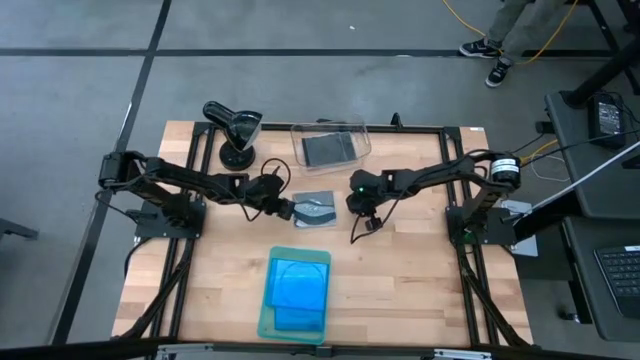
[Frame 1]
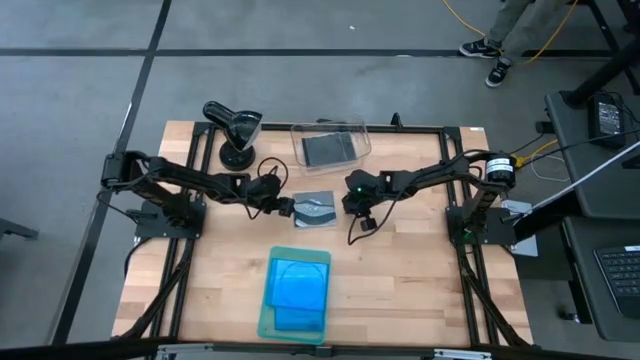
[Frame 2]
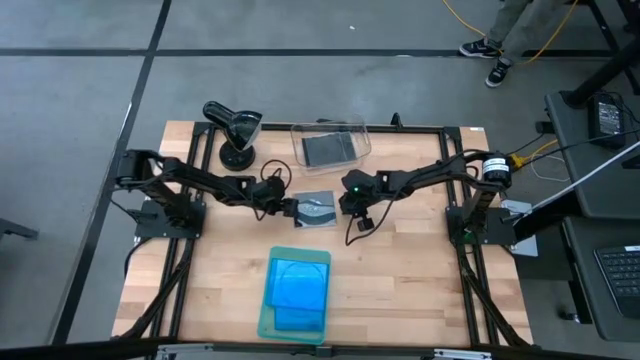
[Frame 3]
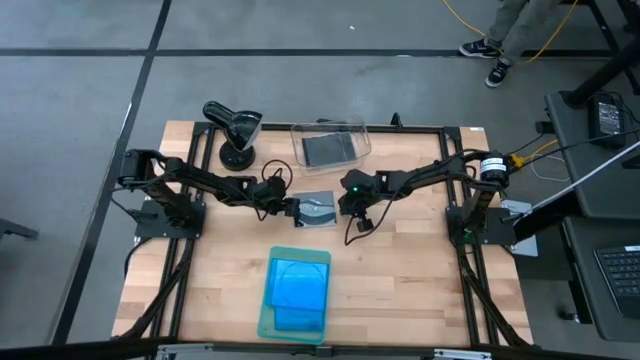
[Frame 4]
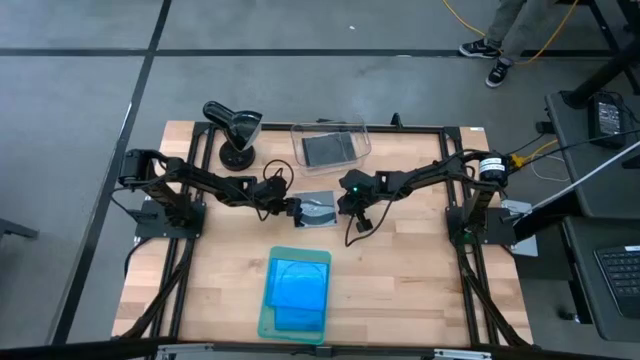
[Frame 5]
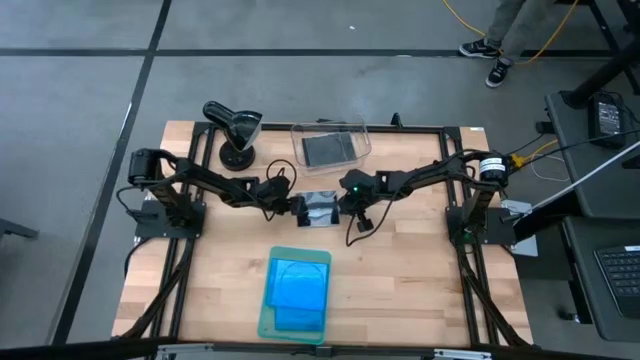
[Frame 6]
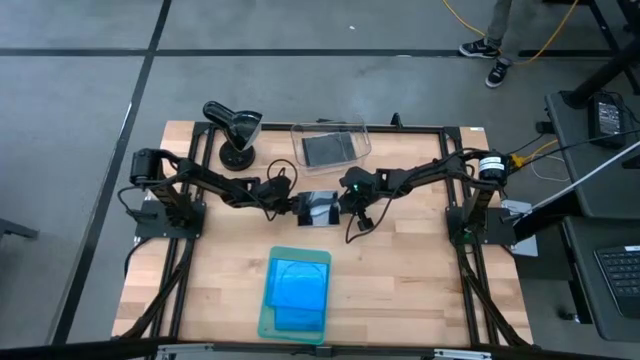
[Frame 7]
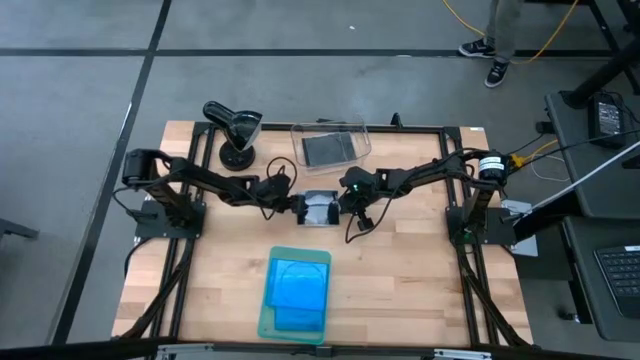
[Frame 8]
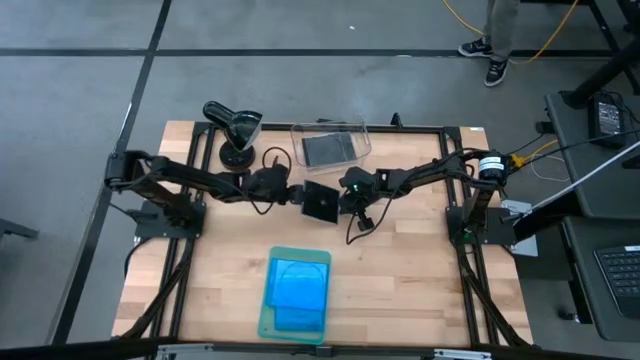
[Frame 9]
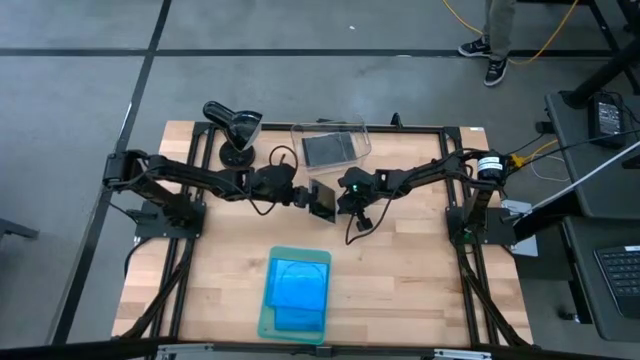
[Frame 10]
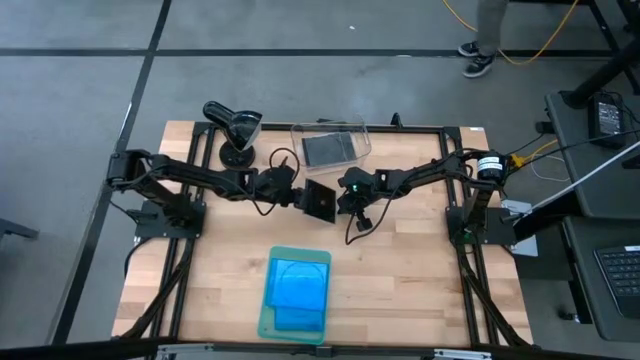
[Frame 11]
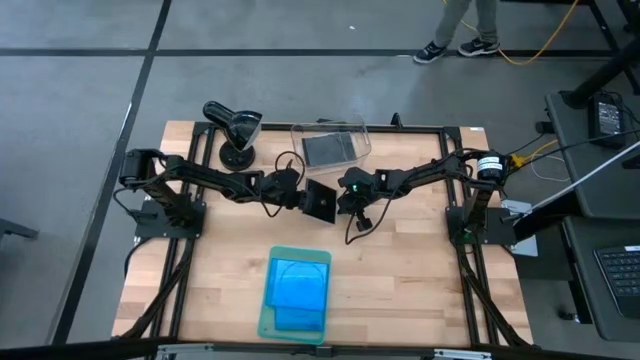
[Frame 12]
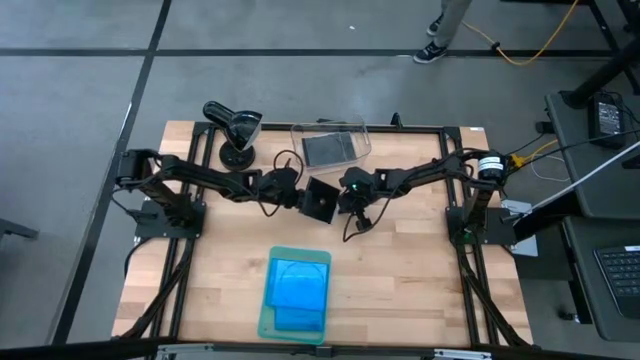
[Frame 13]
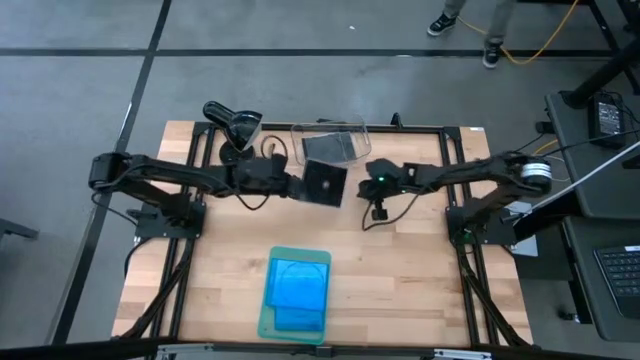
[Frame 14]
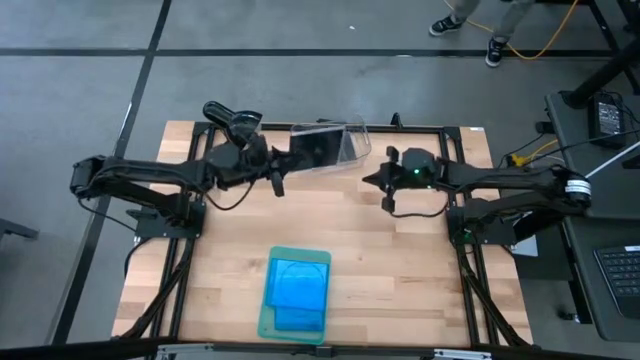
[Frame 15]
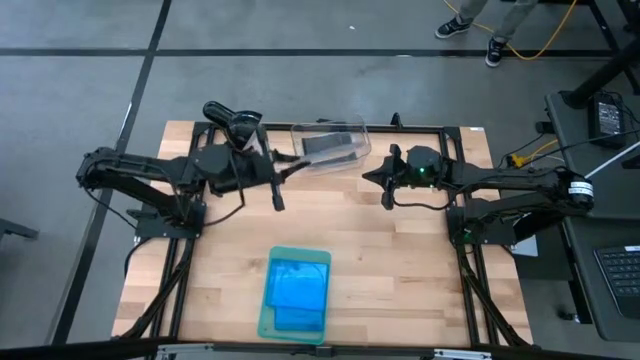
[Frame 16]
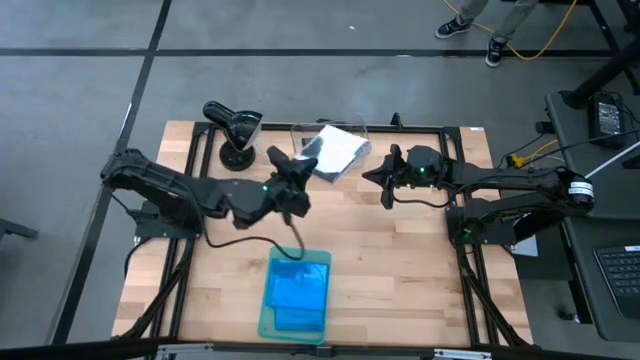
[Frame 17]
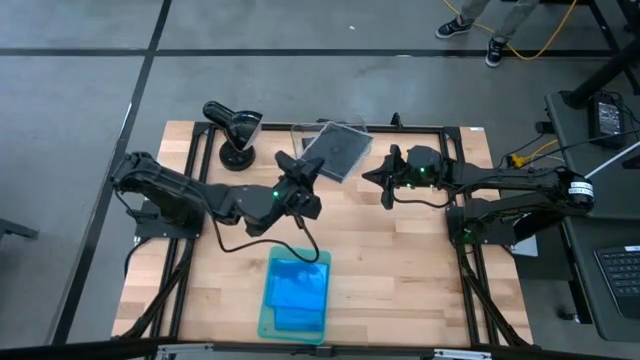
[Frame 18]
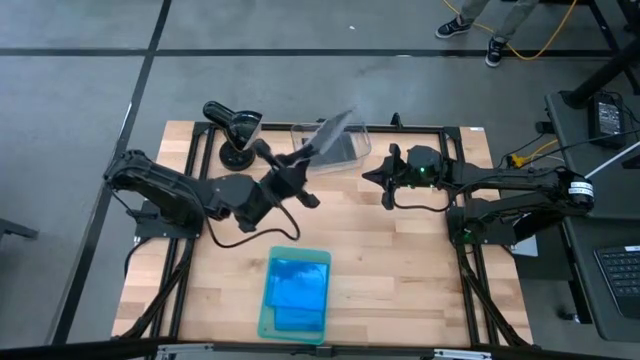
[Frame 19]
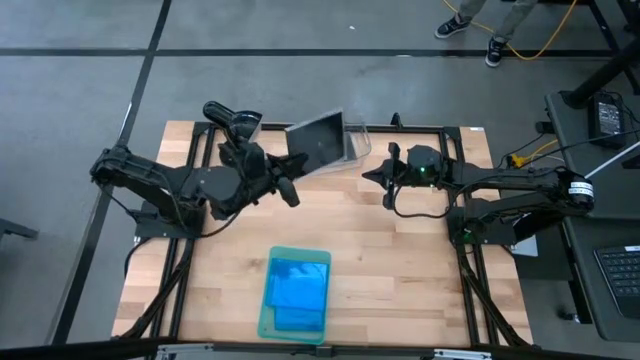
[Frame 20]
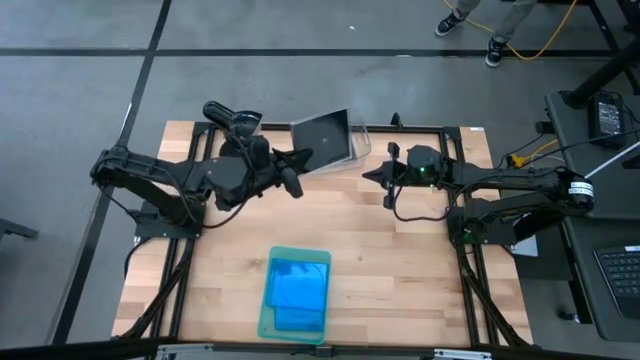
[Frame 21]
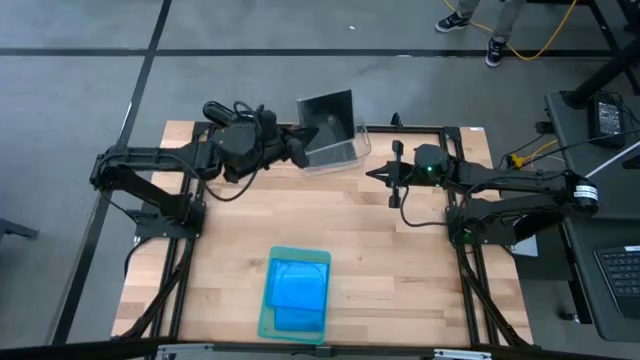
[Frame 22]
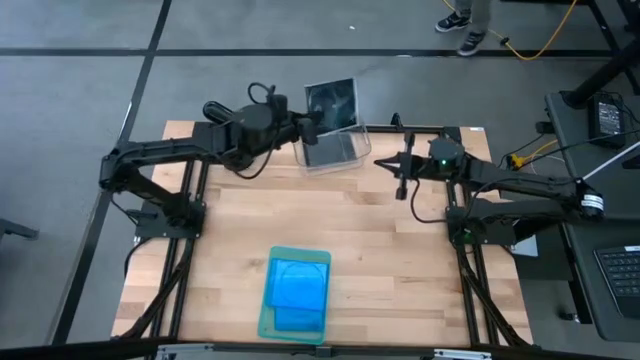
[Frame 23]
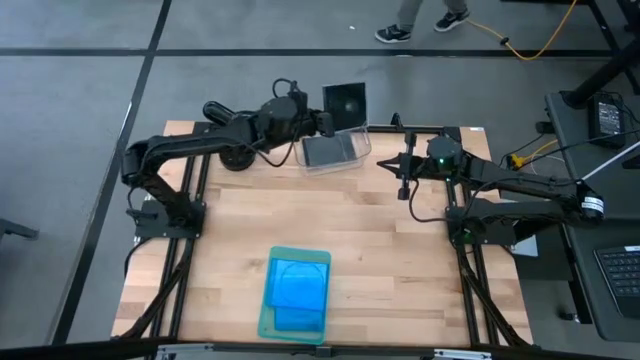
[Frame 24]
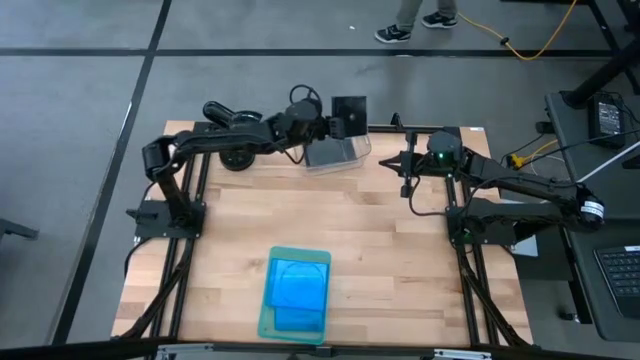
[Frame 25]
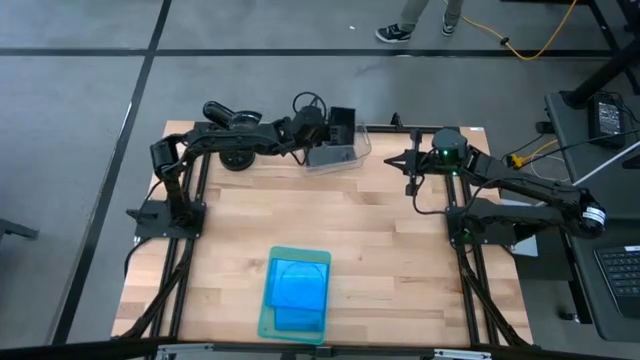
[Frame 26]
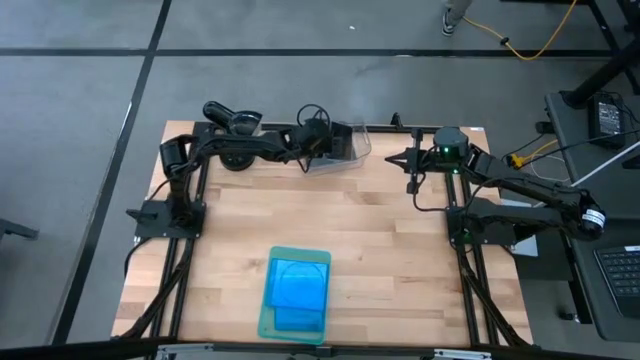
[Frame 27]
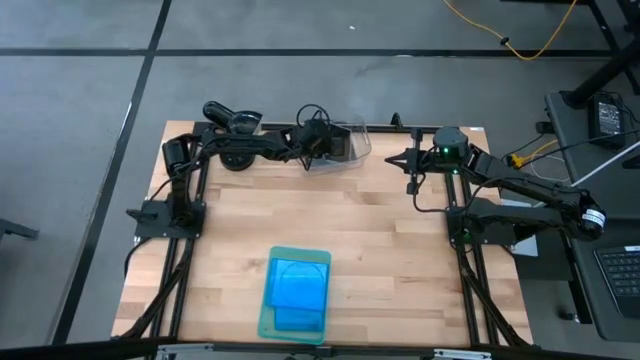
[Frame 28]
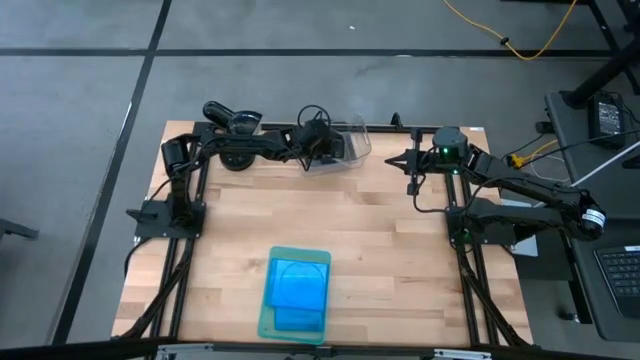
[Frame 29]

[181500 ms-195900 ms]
Task: Pick & place jewel cases by type
Put the black cd case into the transparent bin

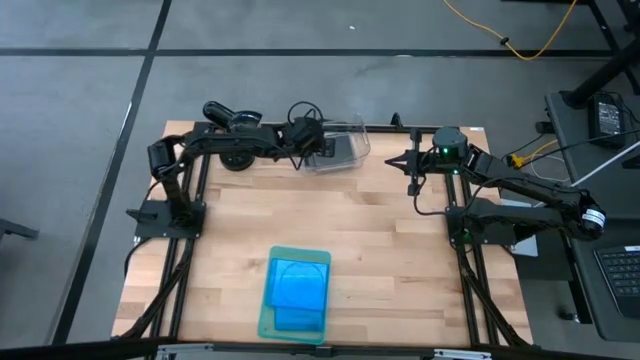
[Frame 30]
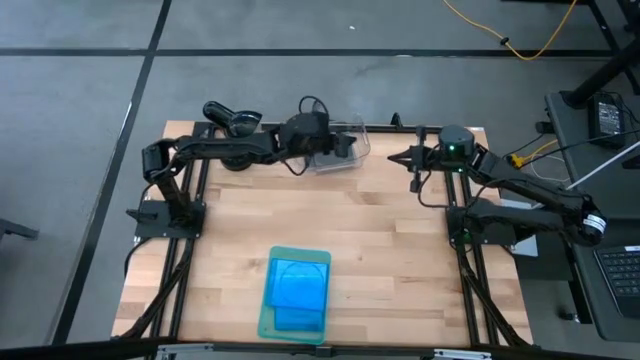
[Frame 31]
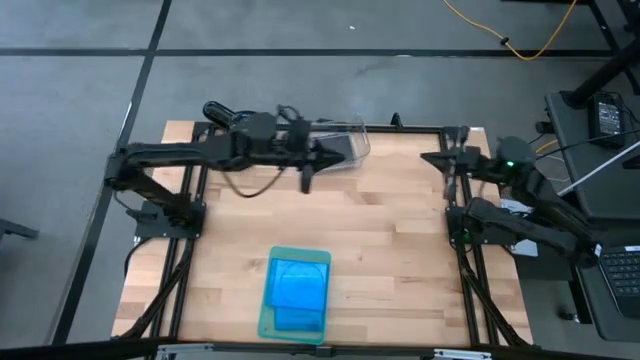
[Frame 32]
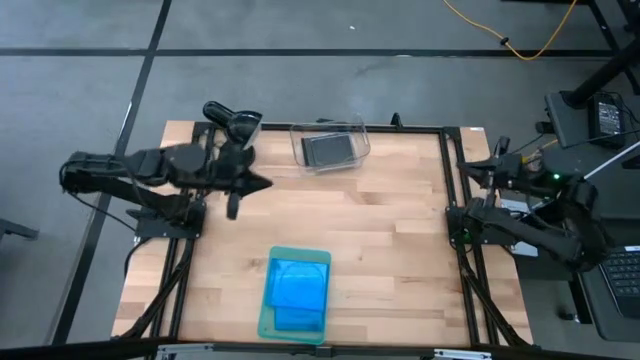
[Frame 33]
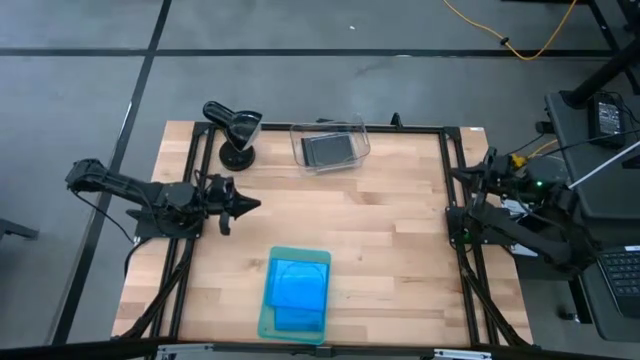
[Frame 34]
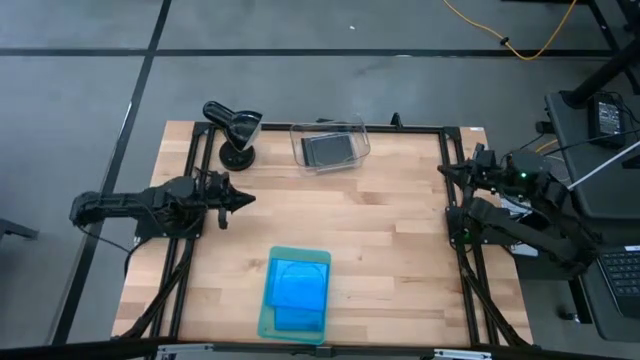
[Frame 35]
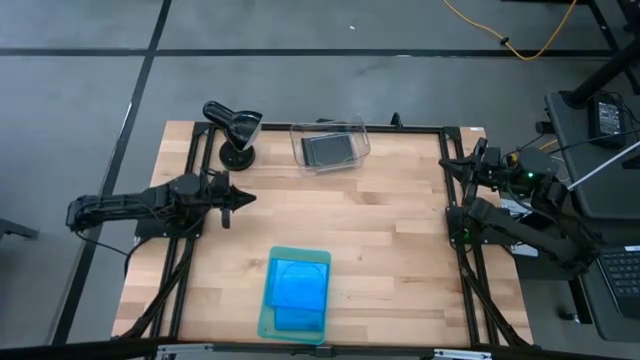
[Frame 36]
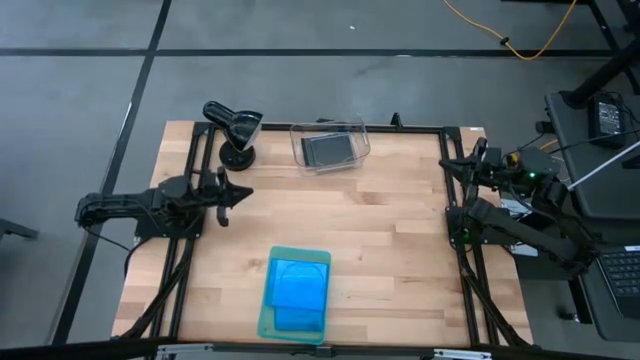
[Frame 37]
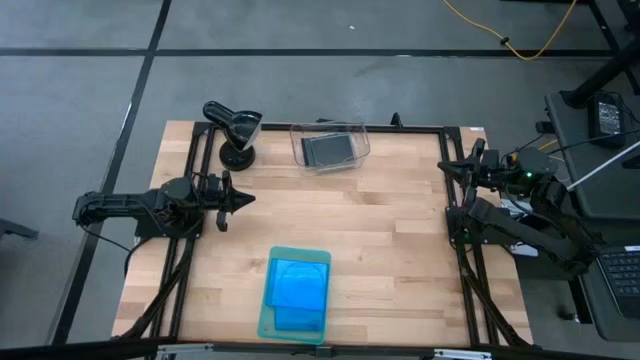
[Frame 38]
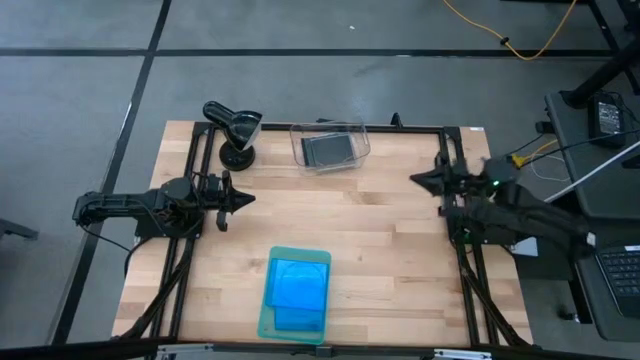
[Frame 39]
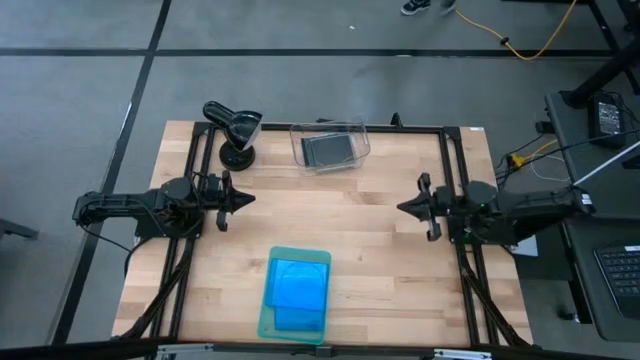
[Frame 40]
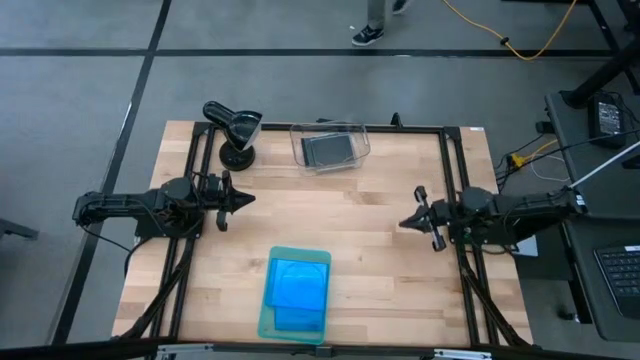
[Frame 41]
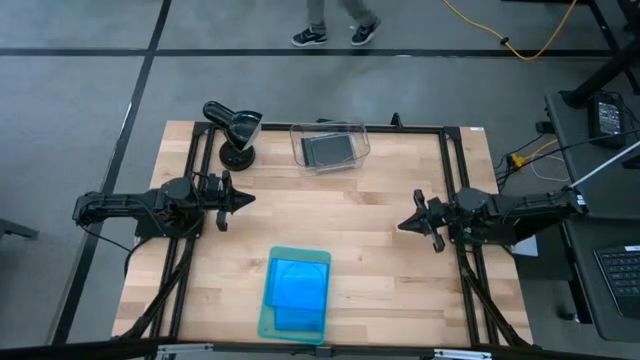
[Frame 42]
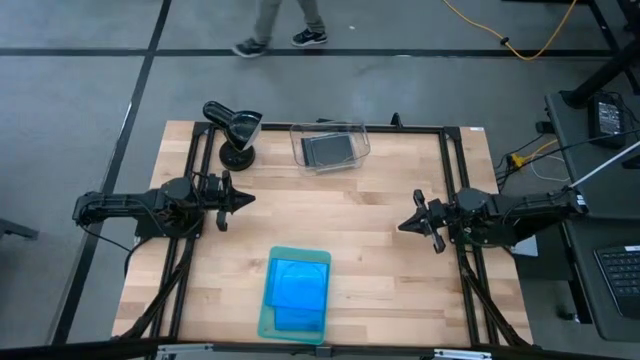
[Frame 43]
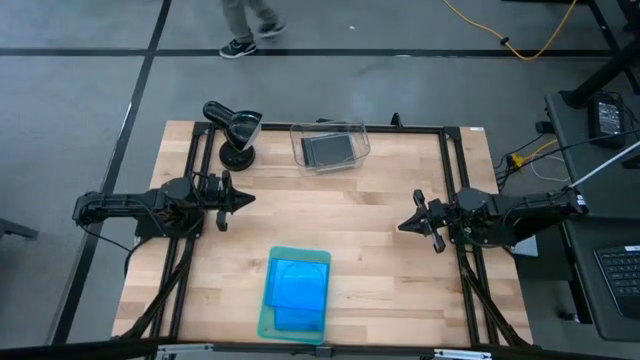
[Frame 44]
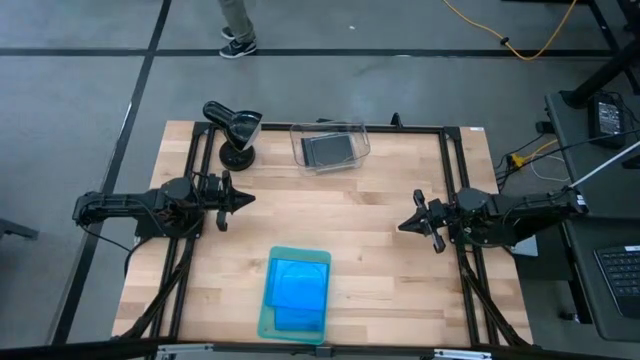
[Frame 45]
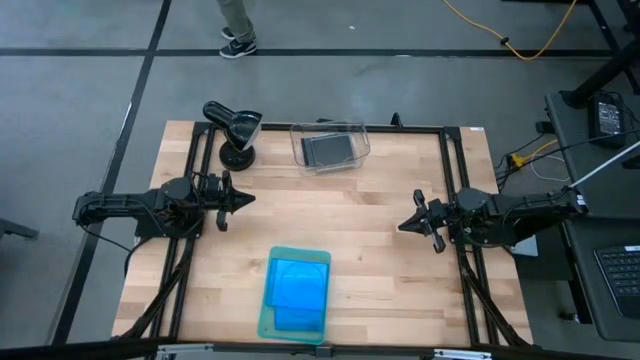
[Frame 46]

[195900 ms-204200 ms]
Return to Home Position
